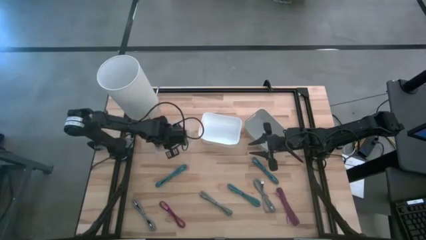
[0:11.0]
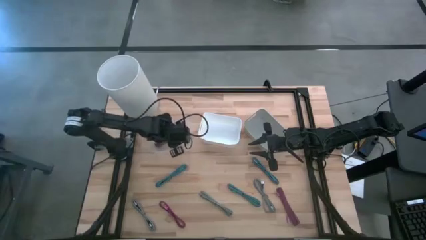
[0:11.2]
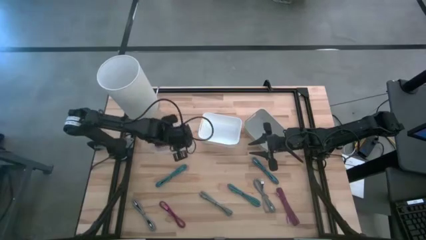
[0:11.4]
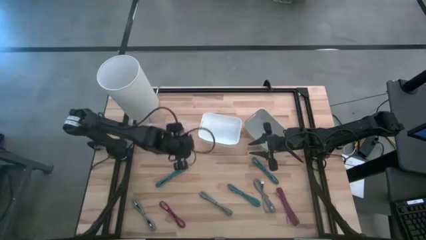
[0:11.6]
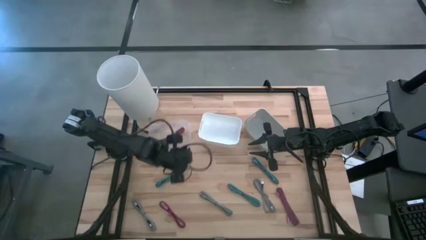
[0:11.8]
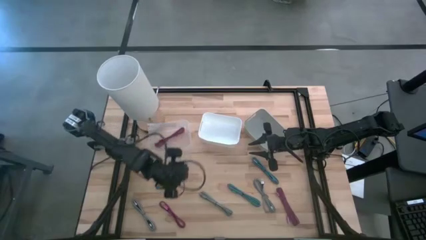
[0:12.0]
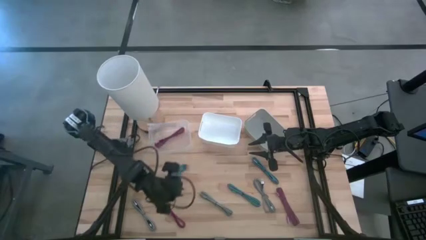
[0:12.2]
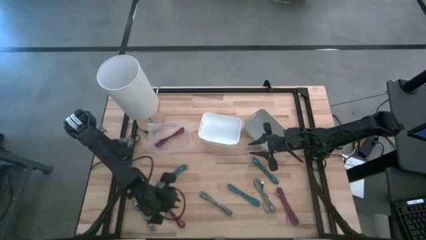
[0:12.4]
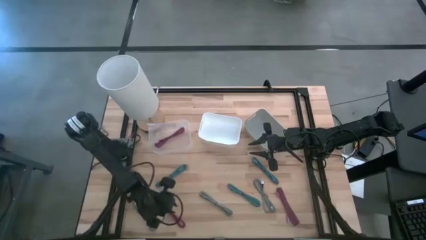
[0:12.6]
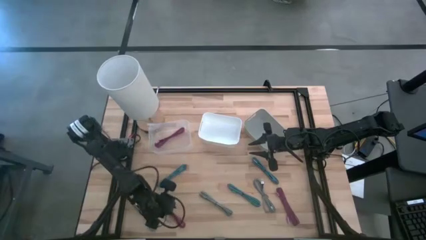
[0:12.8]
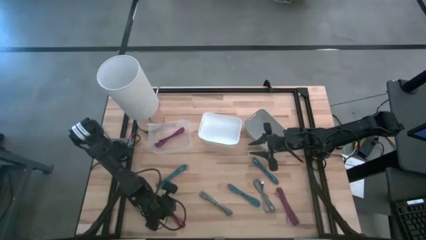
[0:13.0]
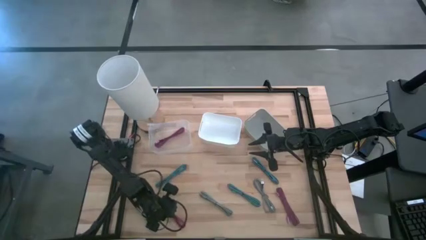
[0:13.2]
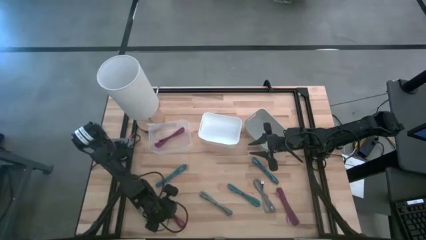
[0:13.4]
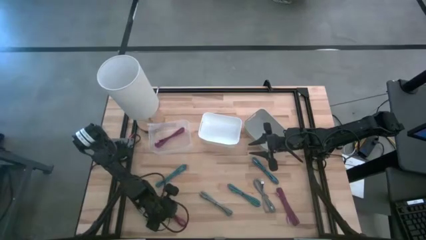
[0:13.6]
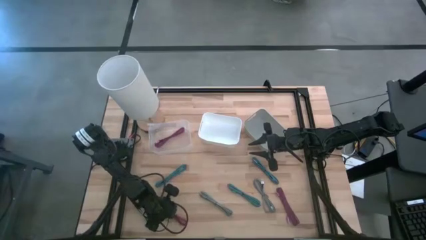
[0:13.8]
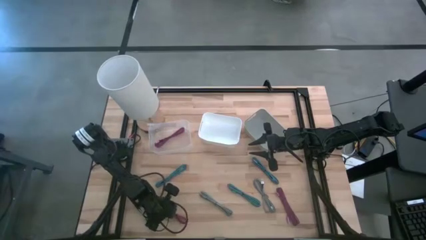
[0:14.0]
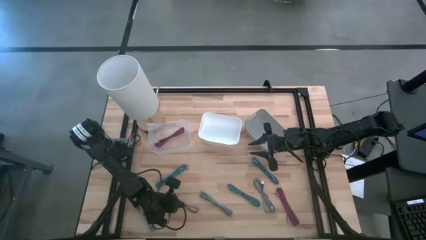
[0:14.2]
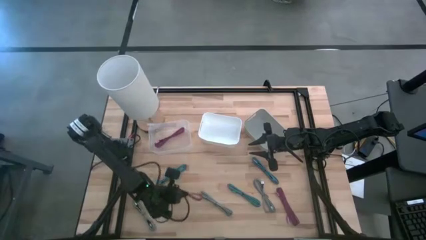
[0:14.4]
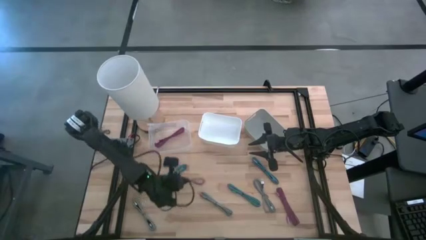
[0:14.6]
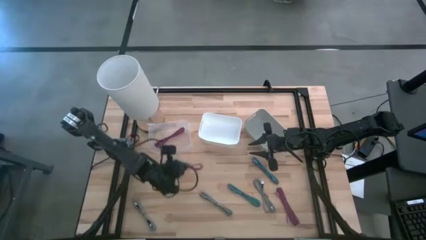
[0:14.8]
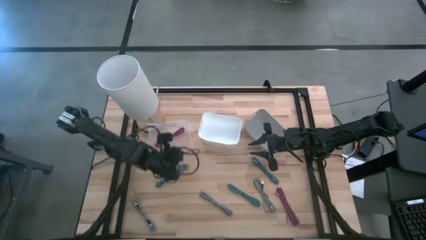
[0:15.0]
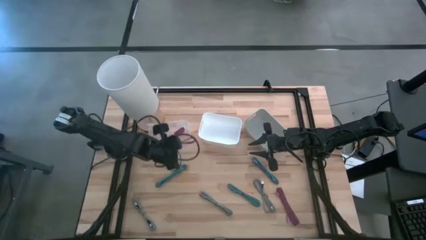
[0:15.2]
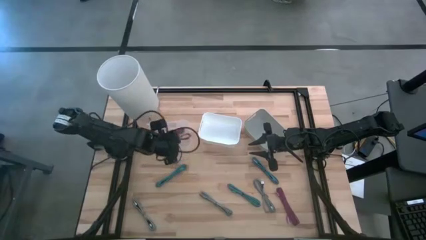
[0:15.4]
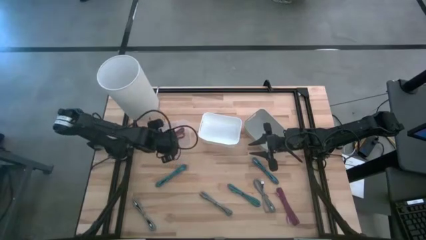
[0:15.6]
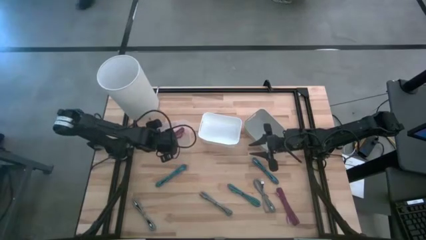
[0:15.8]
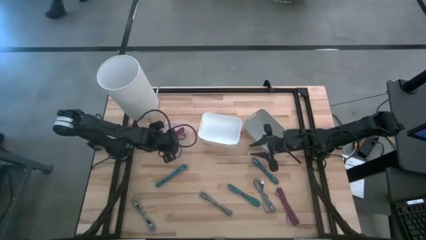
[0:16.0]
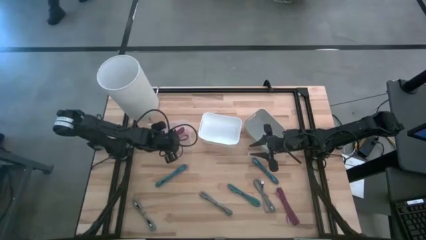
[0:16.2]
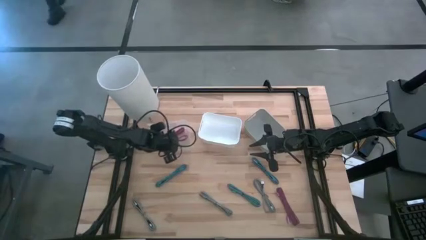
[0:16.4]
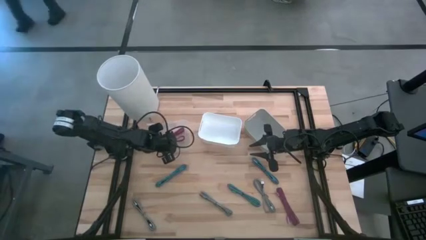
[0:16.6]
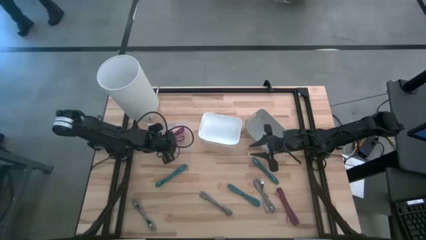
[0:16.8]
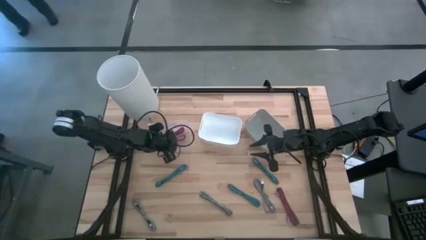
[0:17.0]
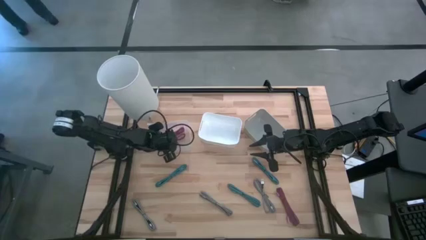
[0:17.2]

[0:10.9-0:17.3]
Task: Pick & Place USB Port
Put the left pink patterned charger cable into the transparent bin

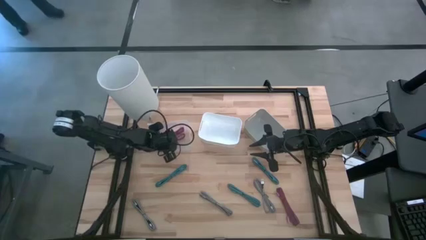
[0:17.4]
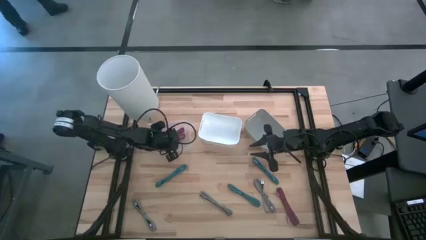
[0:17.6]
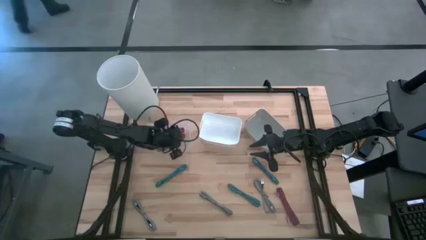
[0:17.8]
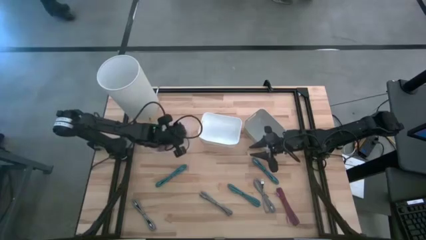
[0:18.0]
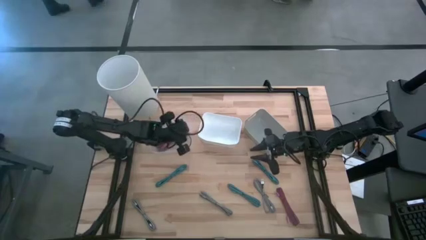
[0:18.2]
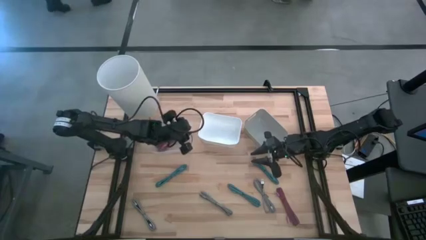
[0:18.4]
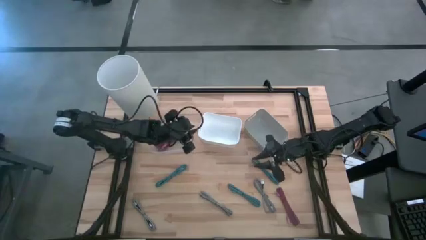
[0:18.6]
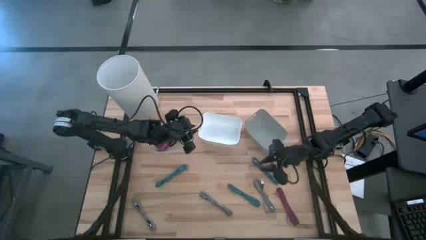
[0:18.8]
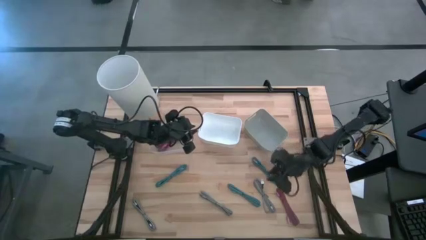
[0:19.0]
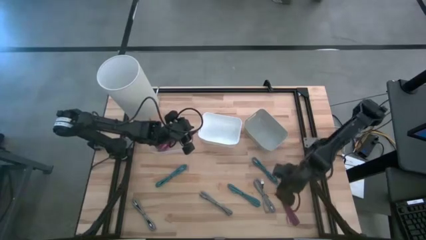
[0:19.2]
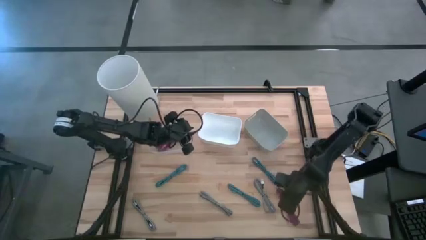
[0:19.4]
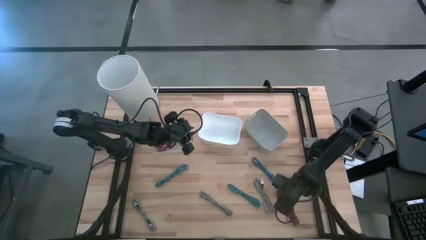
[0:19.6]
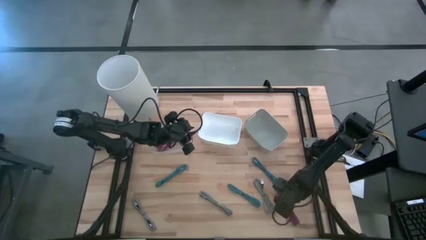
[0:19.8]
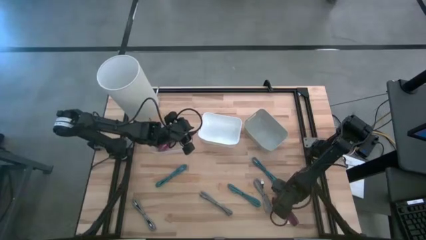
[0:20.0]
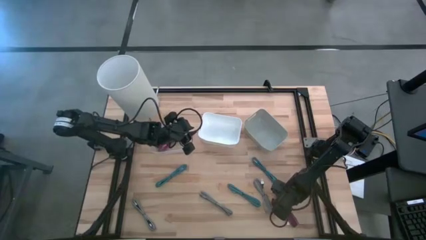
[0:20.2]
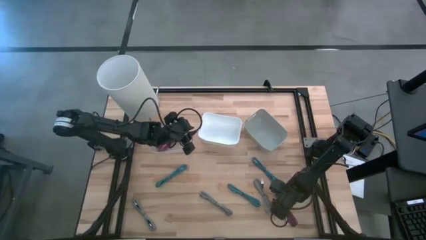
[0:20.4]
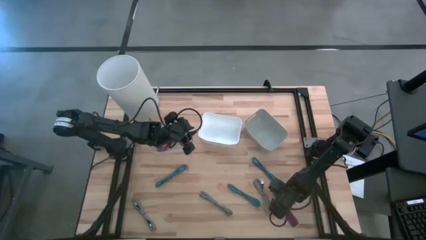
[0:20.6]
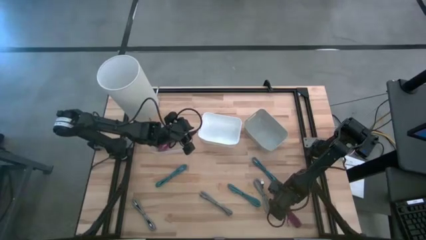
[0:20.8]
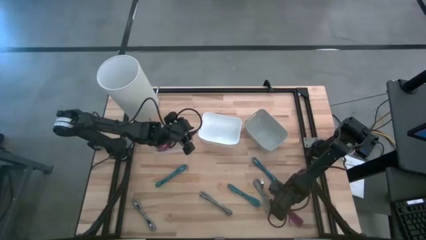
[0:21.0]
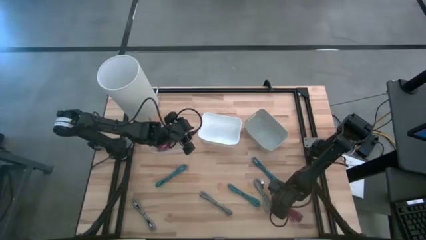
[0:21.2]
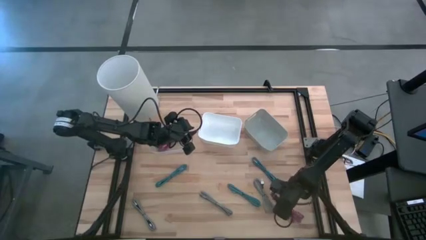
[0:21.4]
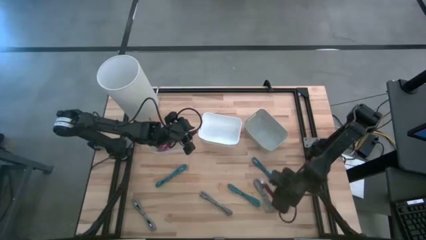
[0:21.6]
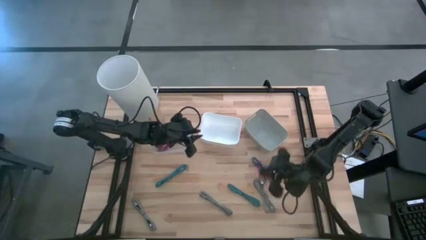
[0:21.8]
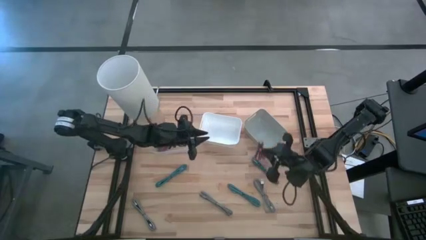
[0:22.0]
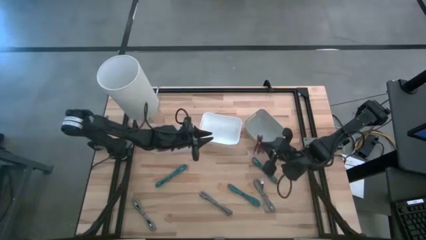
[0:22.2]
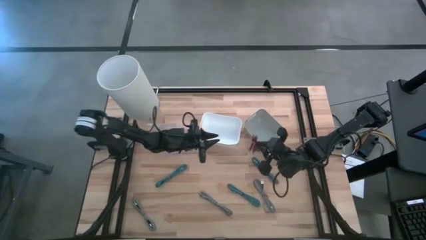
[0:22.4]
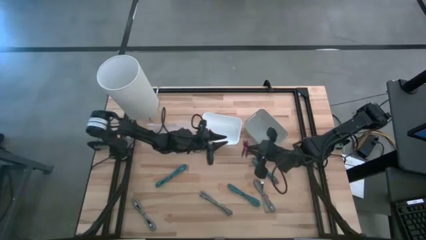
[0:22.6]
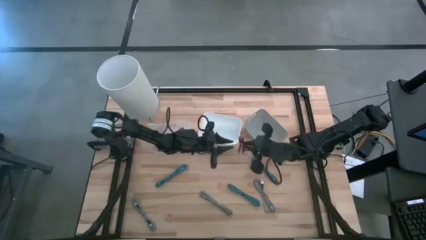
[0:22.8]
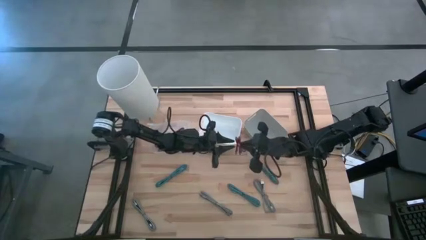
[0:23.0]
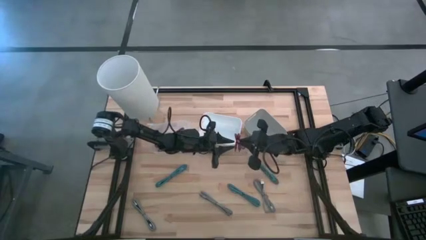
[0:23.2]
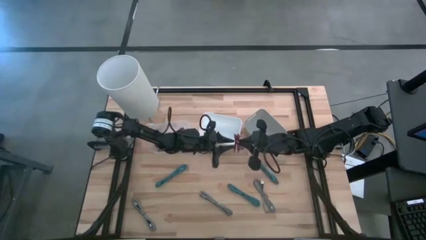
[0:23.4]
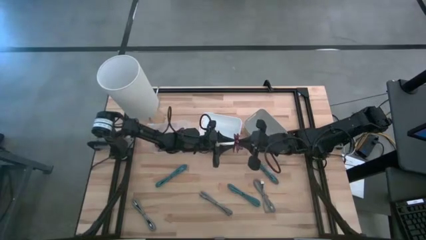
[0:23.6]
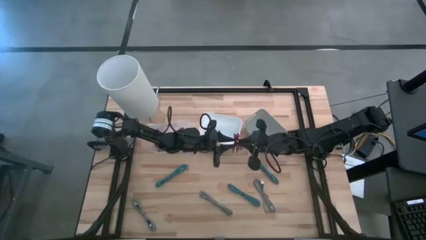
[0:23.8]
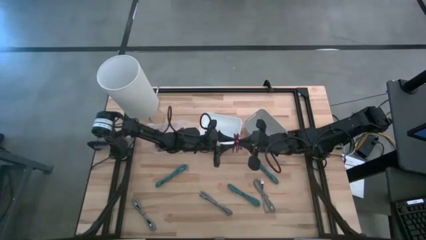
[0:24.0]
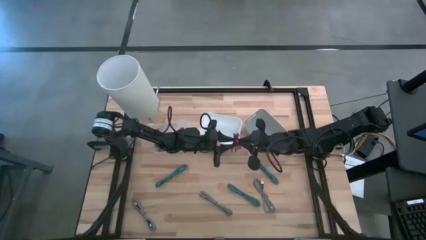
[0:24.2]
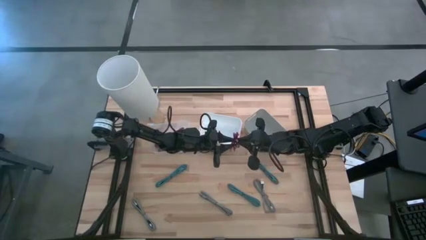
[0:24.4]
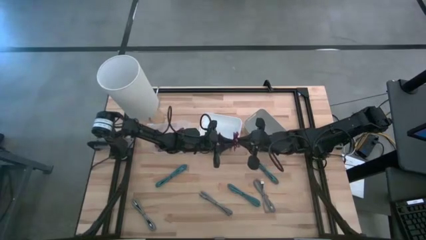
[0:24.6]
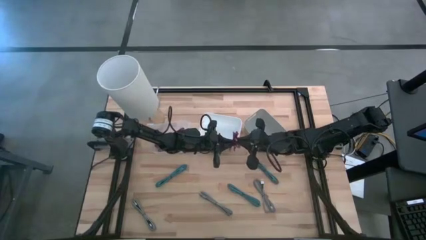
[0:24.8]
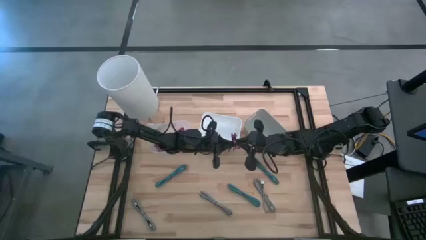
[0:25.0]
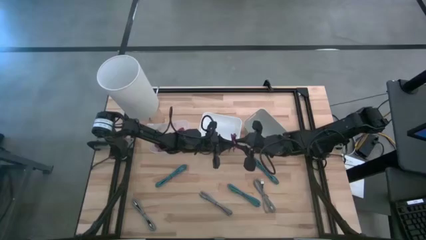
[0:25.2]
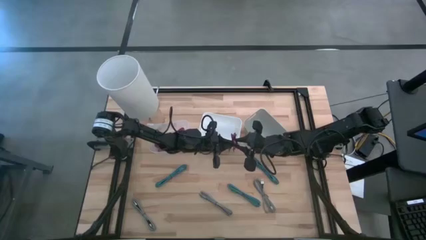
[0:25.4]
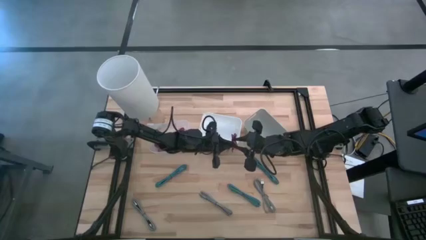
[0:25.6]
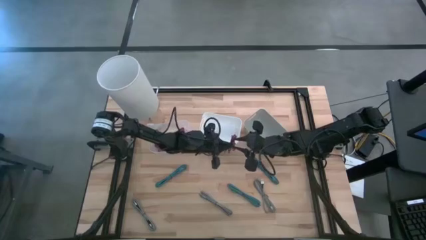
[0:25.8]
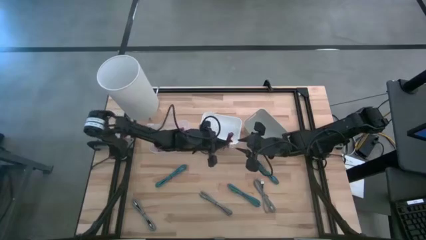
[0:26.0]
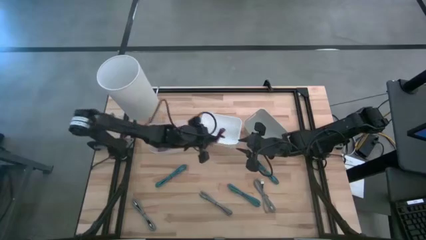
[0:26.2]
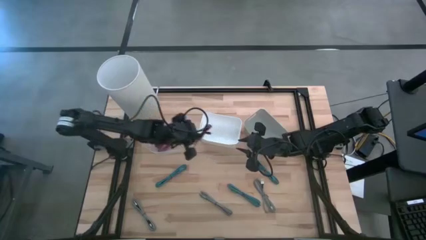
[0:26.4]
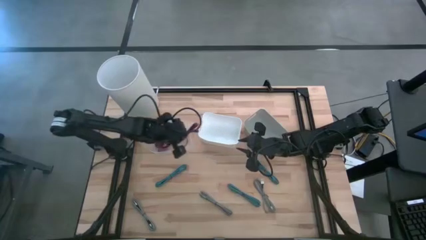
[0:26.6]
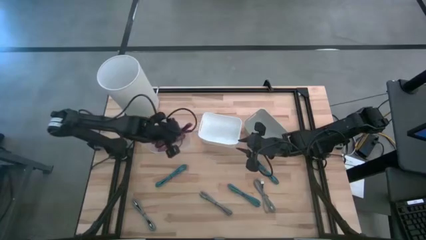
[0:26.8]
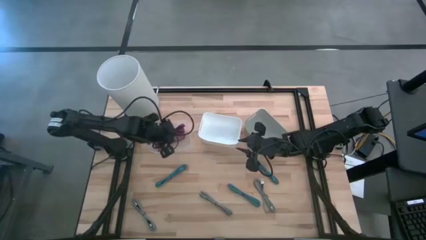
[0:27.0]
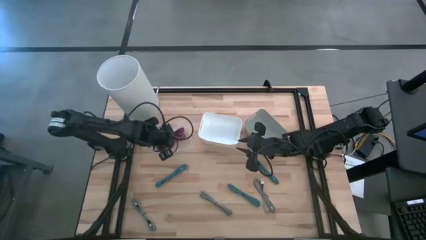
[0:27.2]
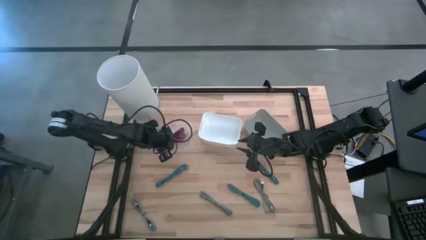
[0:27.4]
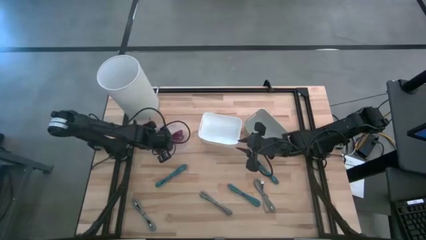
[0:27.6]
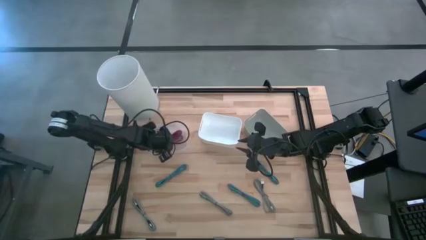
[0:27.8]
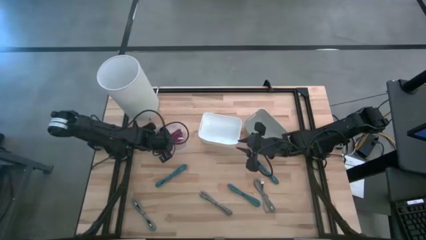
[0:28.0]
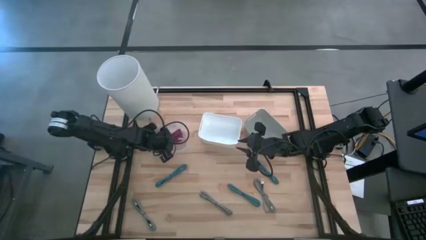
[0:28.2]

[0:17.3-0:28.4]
Put the pink patterned charger cable into the transparent bin
